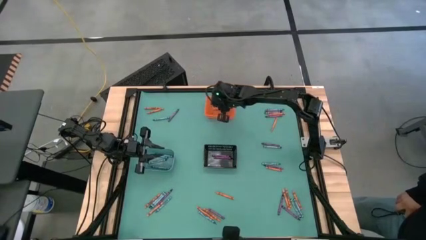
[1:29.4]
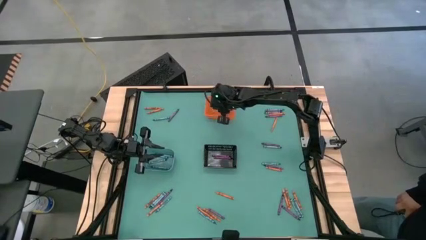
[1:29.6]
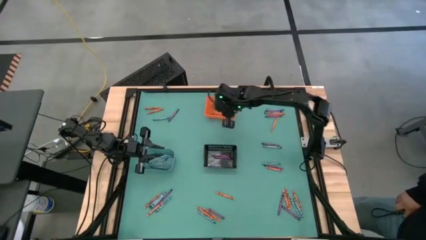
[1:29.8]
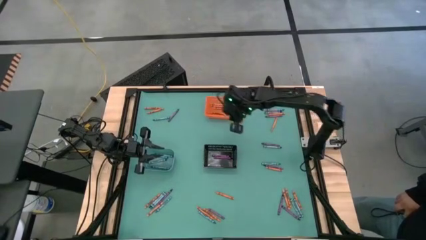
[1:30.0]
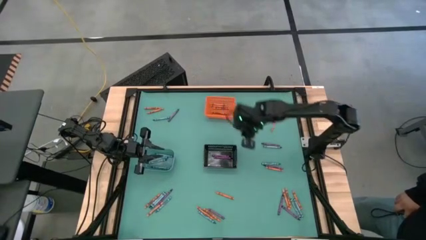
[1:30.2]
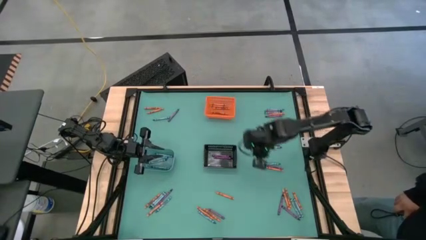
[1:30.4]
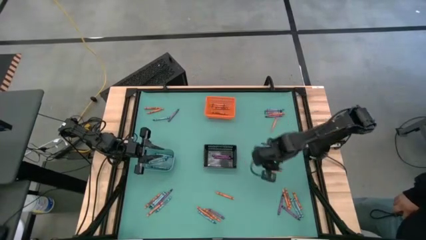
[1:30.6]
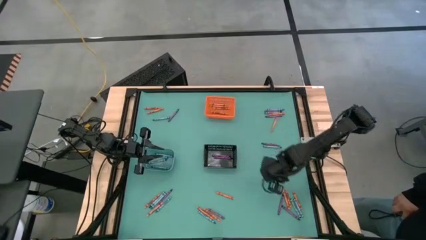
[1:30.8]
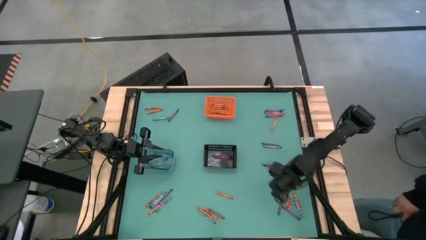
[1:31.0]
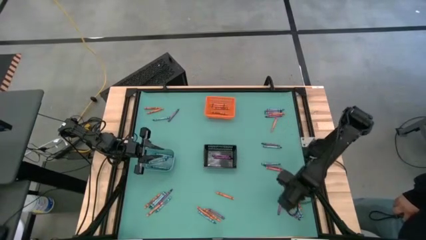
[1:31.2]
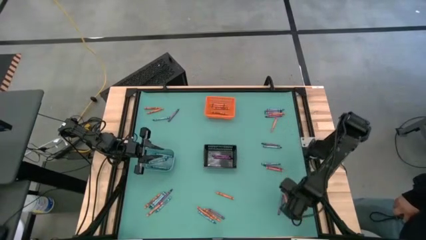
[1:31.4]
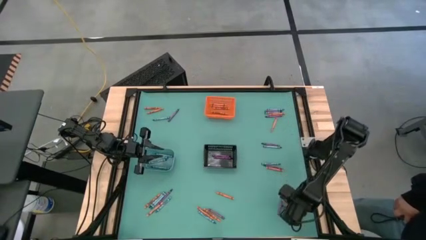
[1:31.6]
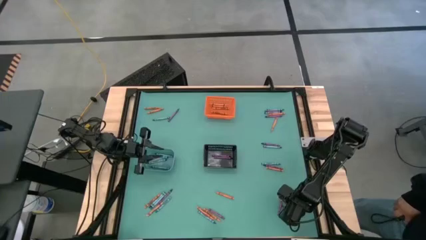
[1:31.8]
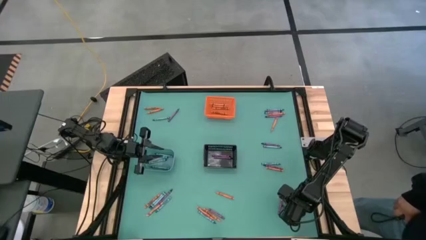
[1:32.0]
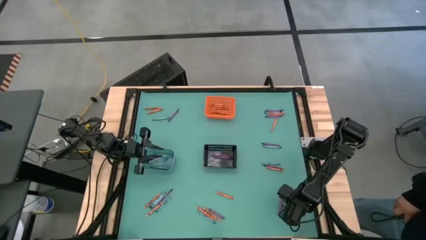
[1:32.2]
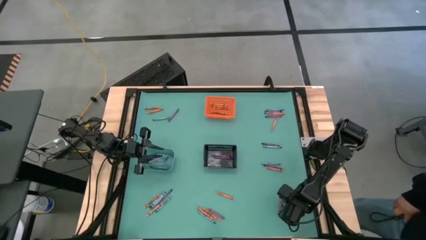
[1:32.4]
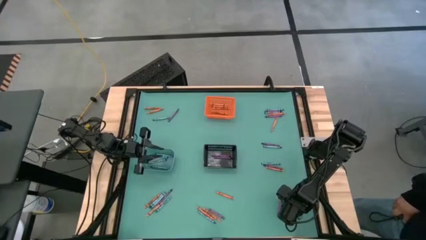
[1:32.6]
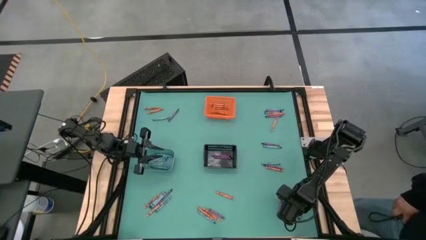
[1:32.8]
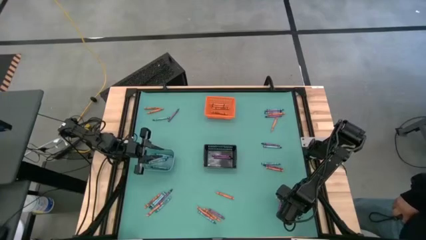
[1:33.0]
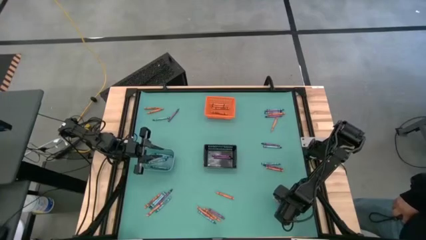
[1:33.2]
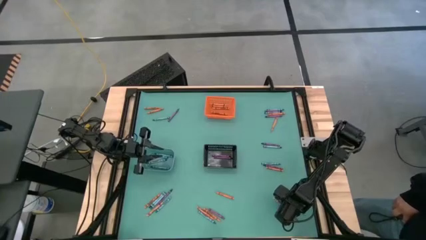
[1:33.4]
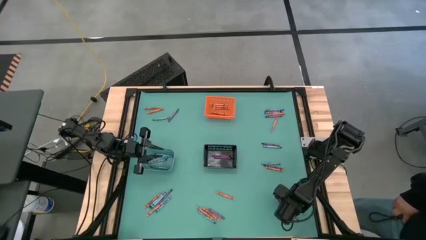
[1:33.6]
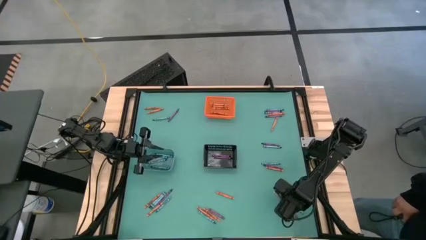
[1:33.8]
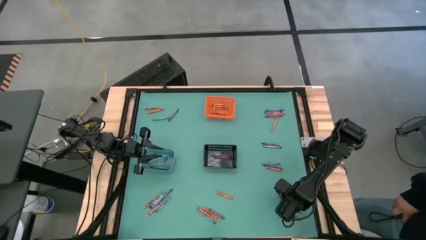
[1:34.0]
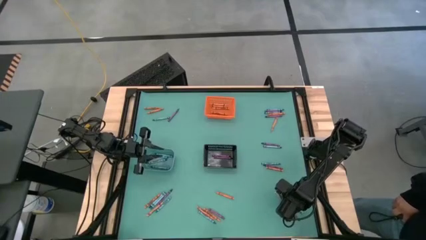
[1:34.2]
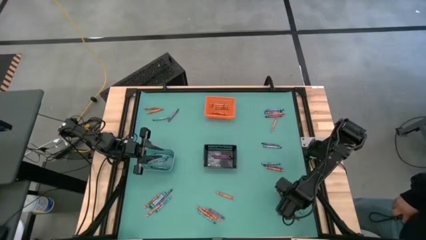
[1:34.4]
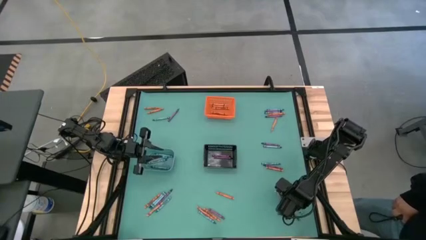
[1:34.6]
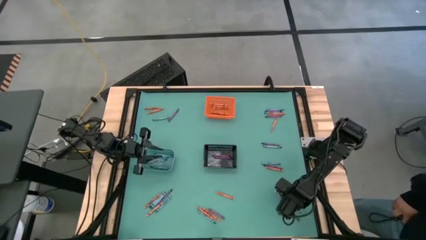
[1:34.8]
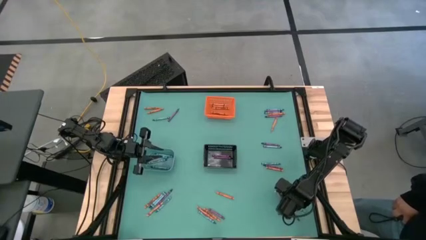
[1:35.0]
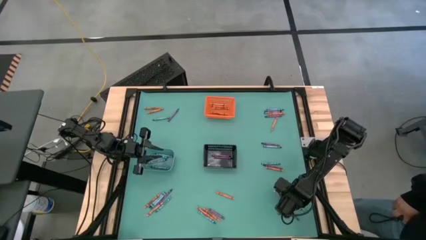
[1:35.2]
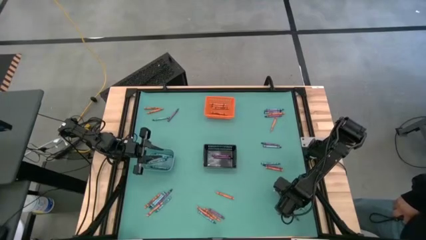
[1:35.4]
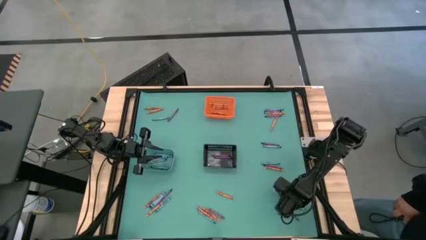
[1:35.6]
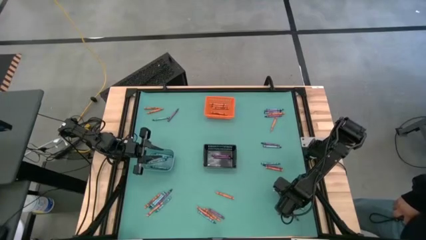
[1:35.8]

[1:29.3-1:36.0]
Task: Sort crayons
Put the blue crayon into the light blue bin

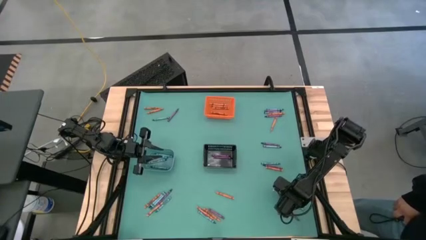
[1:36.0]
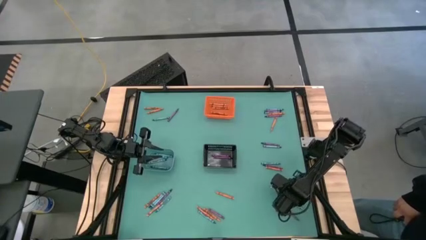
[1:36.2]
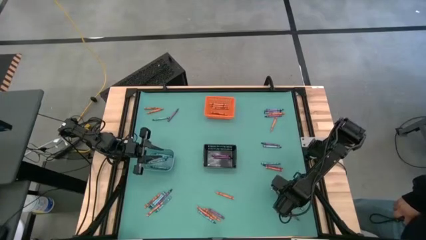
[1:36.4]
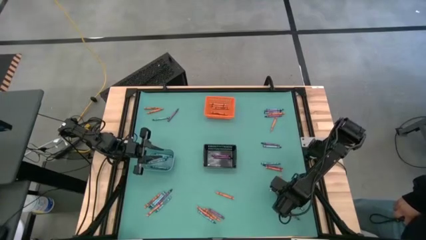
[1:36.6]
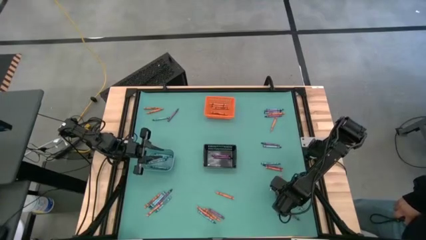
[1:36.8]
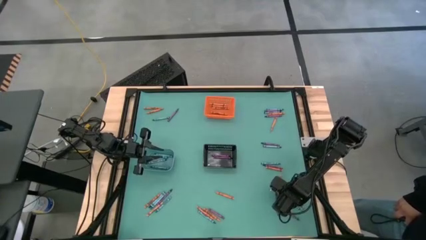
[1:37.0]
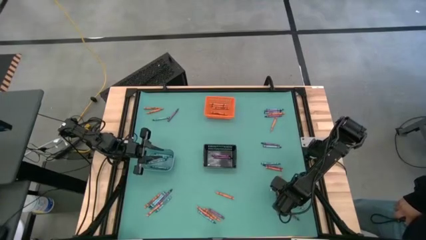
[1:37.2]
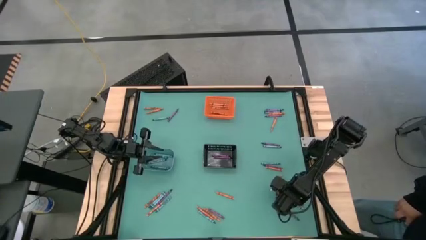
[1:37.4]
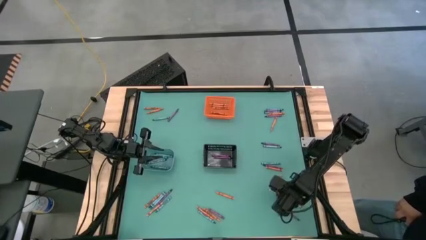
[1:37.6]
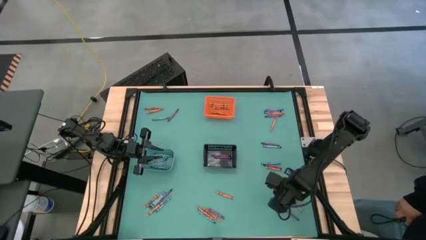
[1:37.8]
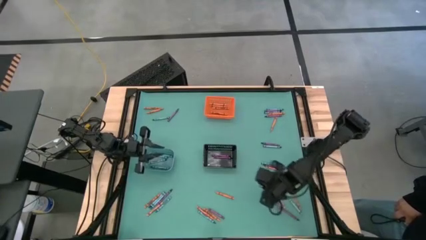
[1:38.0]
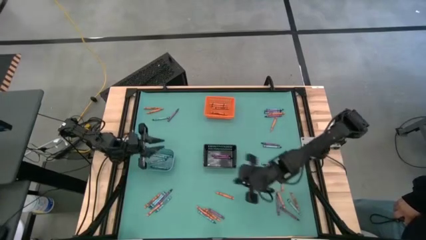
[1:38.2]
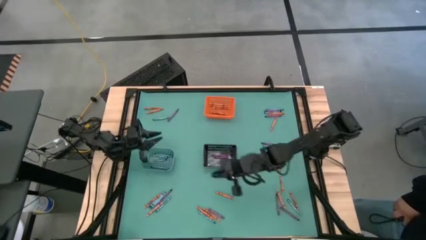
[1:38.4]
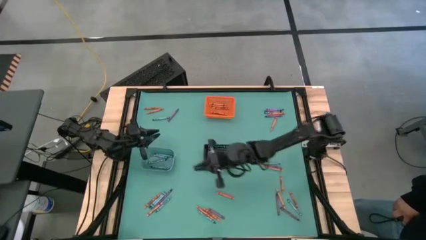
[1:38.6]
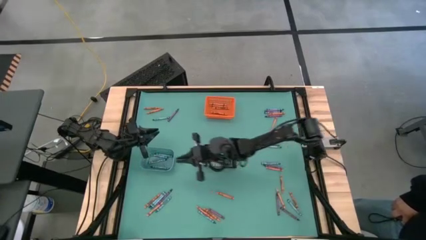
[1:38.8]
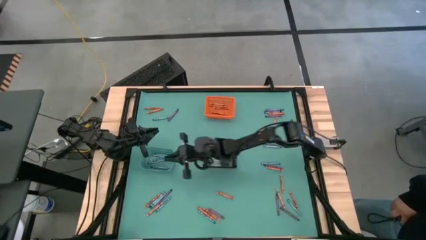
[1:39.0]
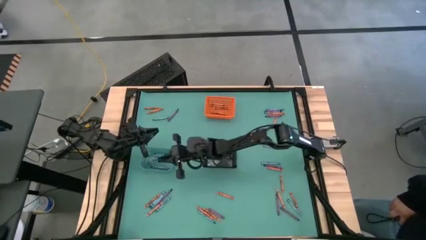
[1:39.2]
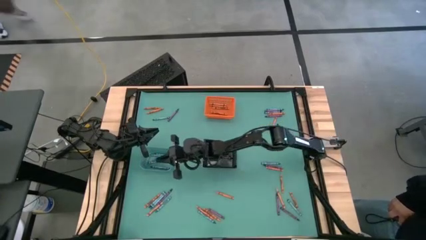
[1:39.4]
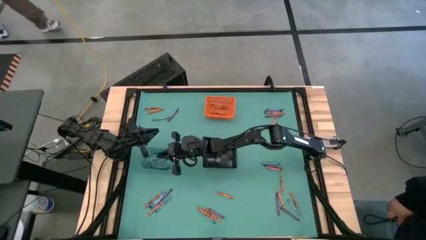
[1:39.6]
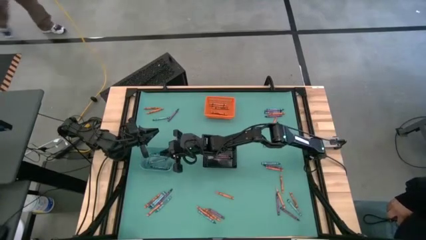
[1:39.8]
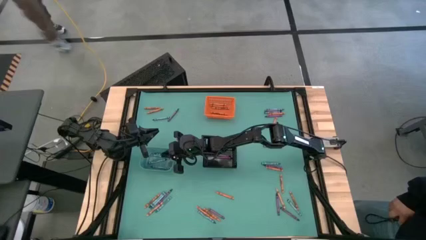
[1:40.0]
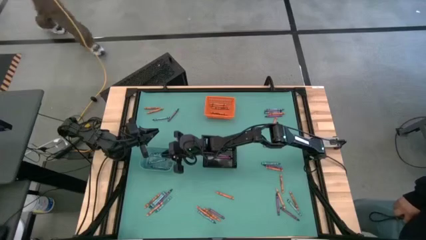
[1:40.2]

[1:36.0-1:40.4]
Put the blue crayon into the light blue bin

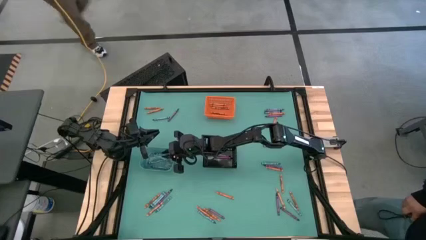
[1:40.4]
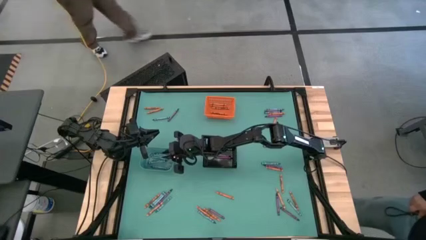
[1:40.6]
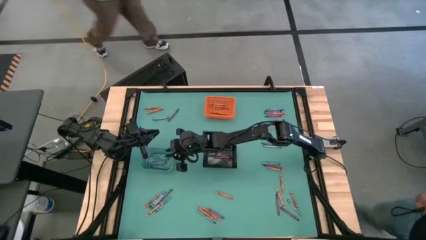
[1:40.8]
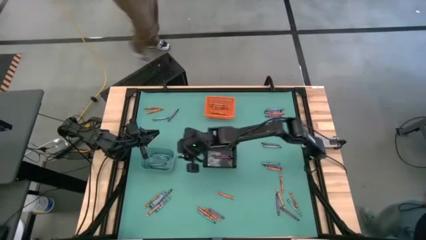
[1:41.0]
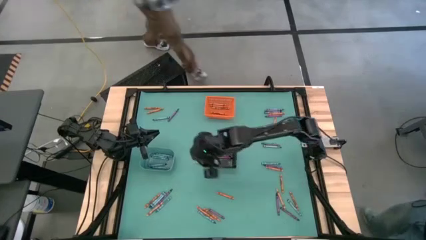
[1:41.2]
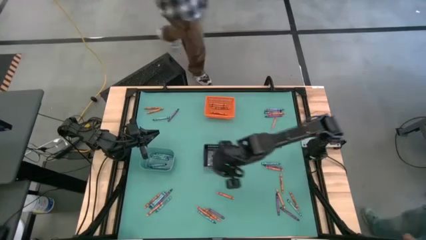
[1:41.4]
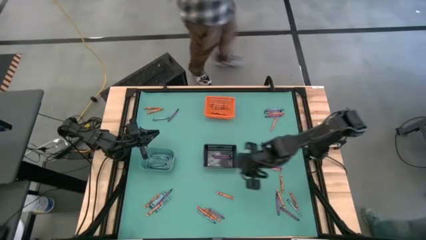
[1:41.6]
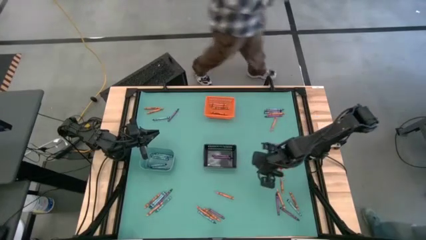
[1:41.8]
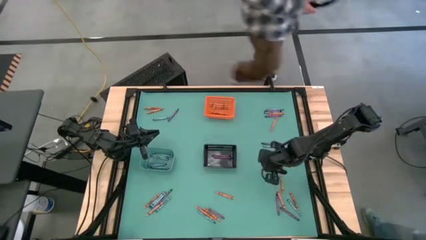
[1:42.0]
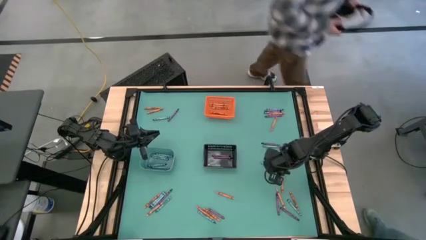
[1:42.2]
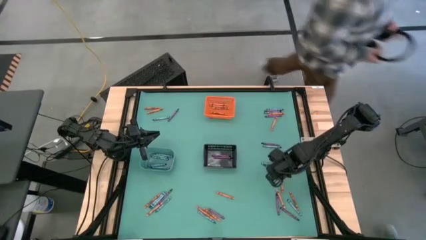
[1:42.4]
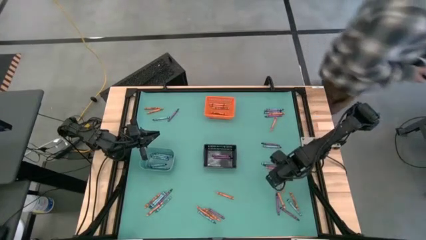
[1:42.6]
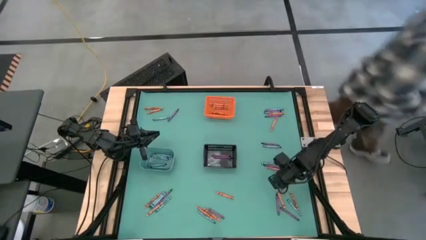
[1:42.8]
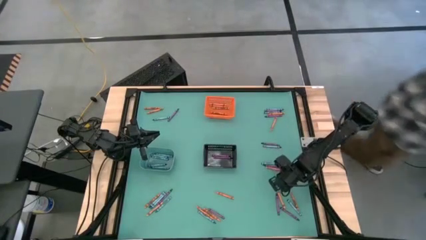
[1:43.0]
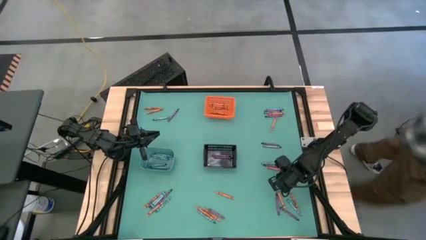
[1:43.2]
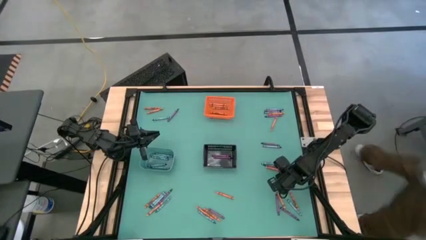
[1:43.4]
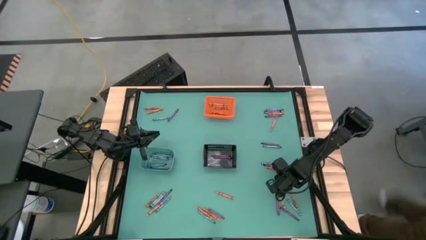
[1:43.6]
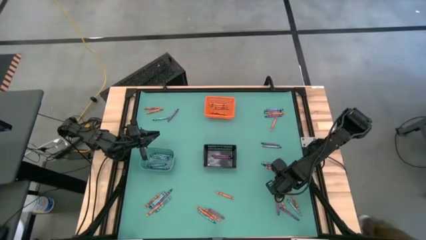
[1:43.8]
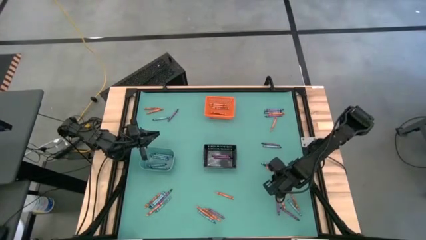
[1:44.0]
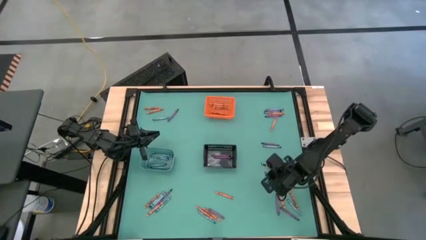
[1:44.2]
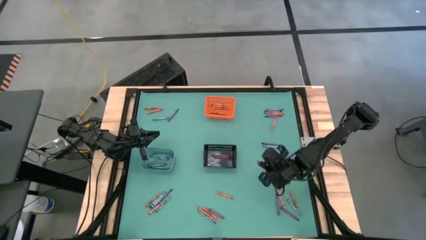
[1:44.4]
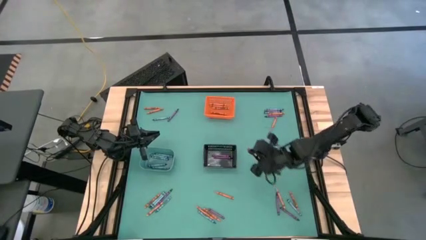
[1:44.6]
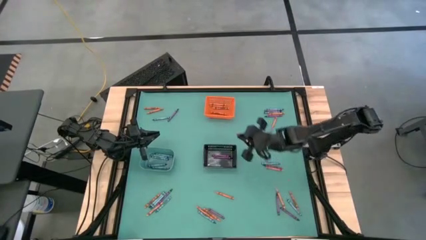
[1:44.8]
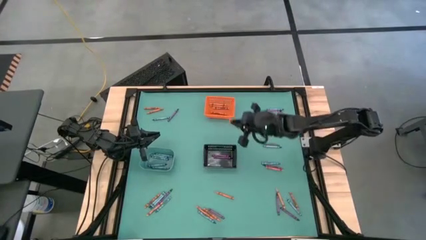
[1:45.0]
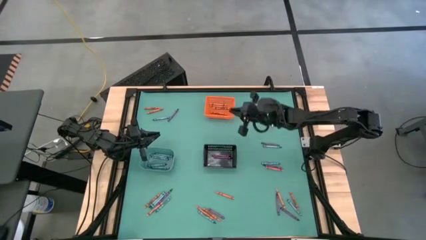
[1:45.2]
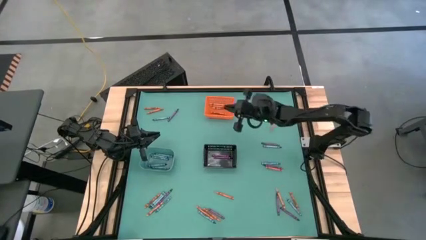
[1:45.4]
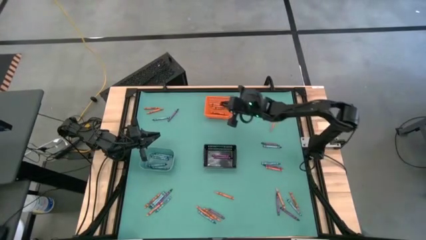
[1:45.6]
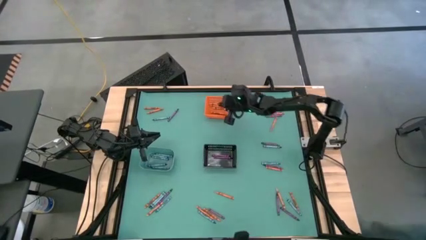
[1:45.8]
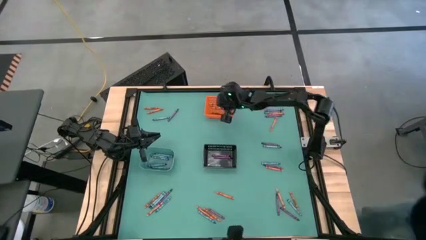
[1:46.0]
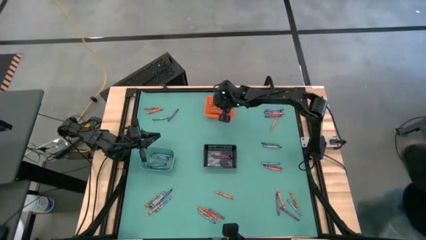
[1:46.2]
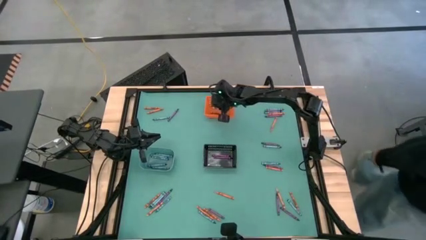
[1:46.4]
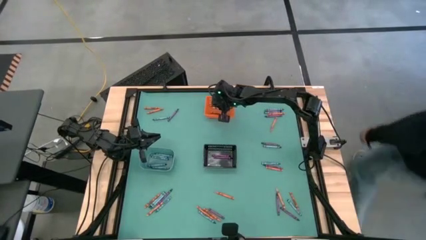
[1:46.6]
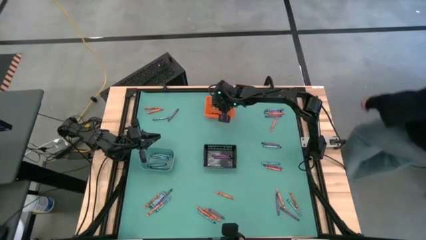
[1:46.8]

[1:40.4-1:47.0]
Put the orange crayon into the orange bin
